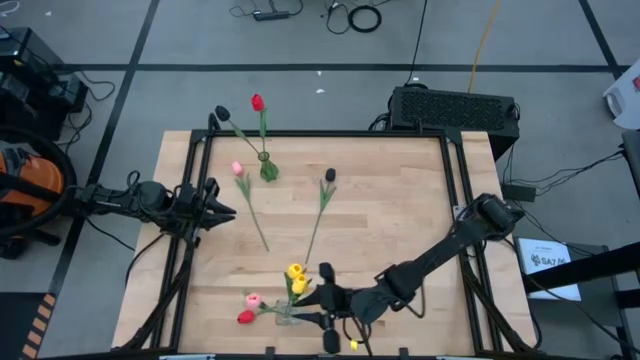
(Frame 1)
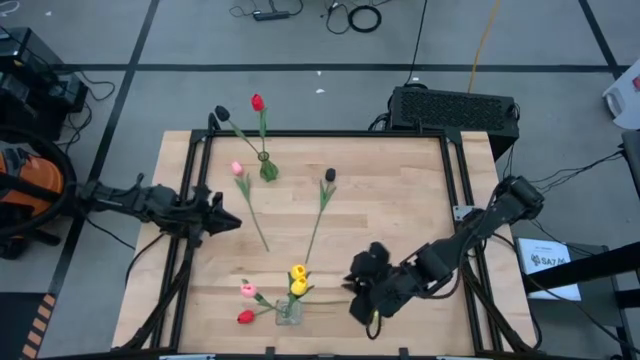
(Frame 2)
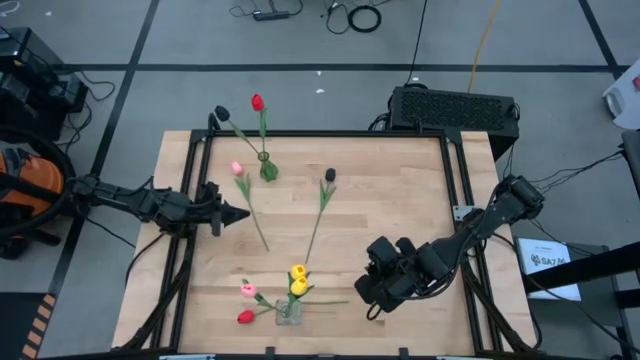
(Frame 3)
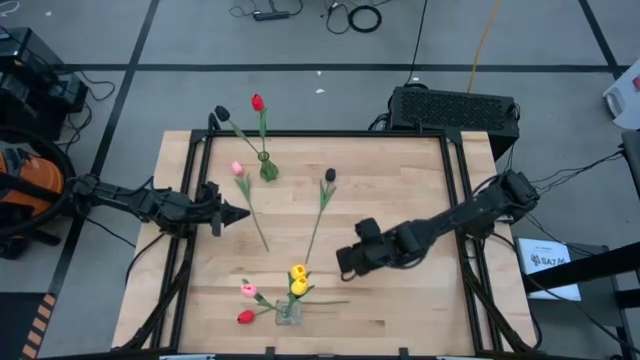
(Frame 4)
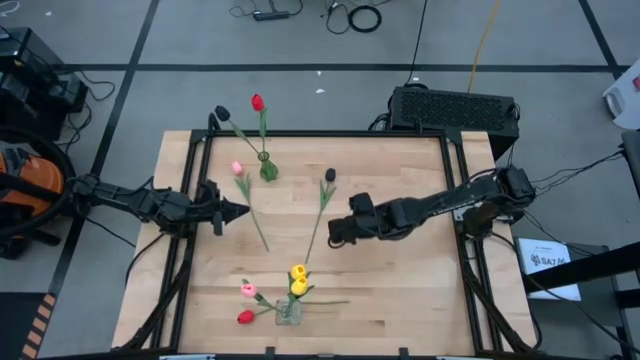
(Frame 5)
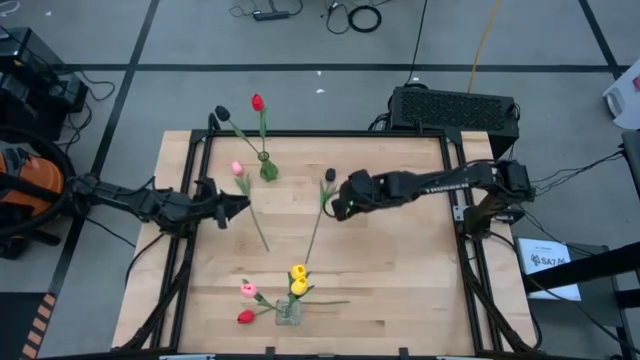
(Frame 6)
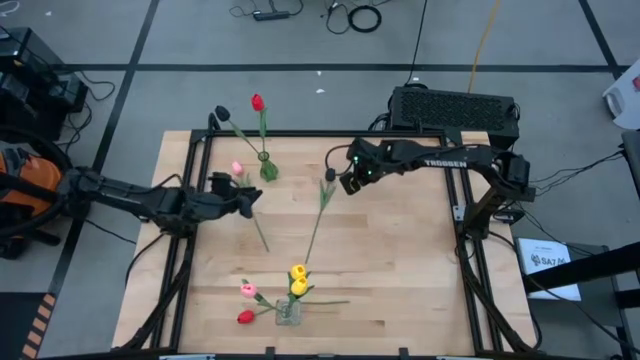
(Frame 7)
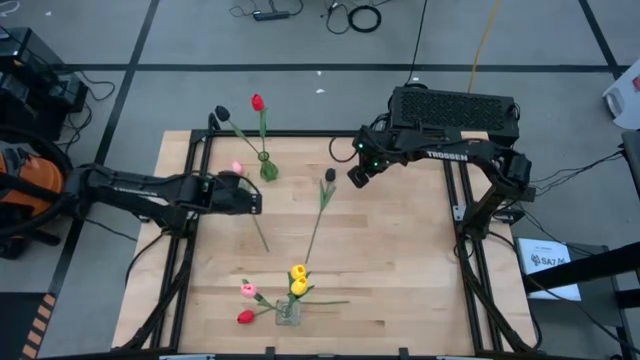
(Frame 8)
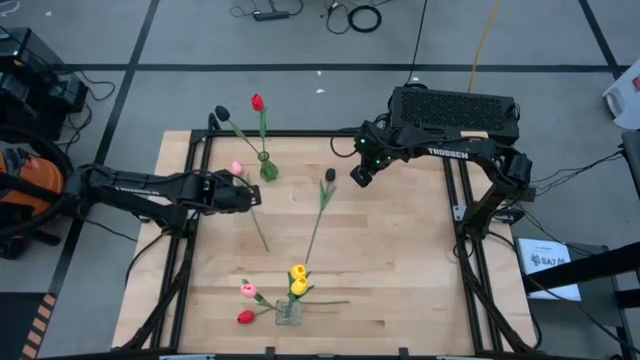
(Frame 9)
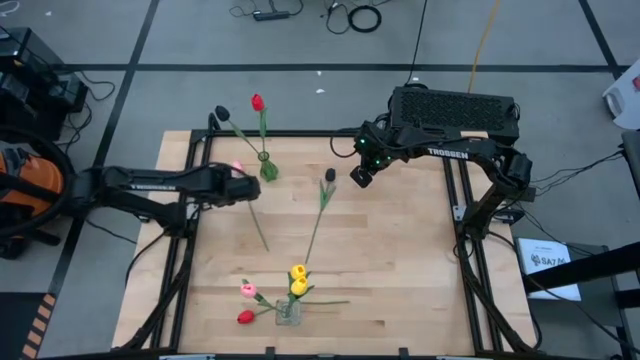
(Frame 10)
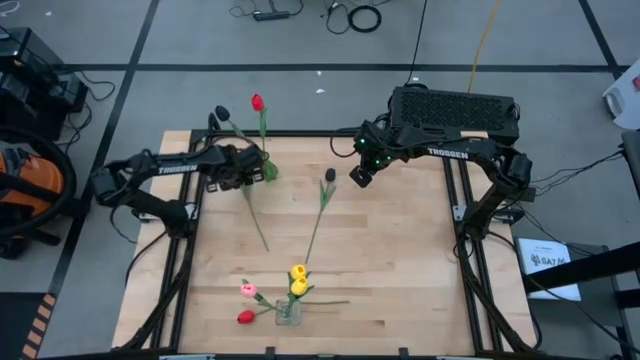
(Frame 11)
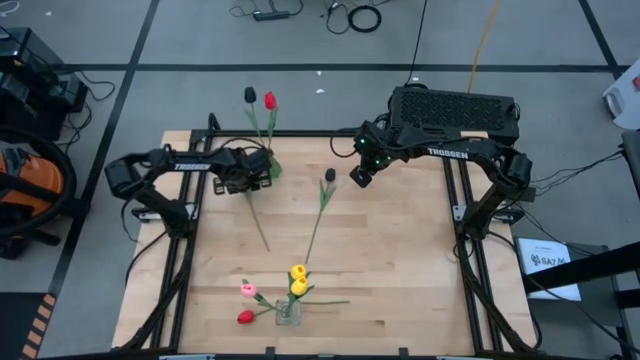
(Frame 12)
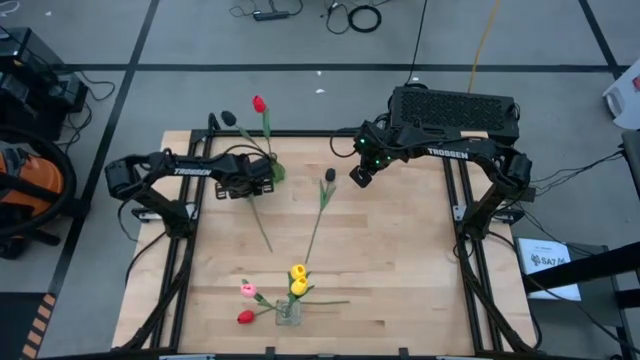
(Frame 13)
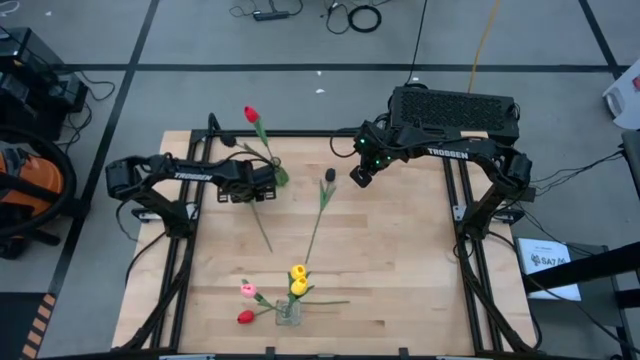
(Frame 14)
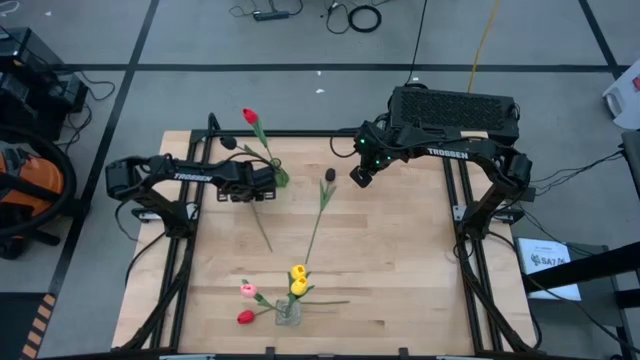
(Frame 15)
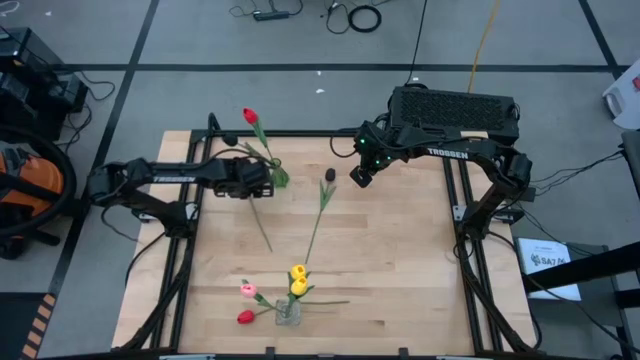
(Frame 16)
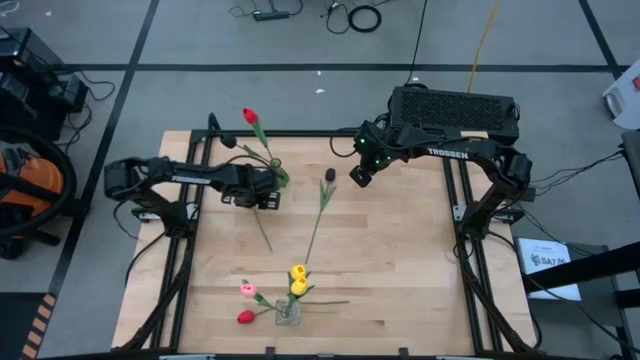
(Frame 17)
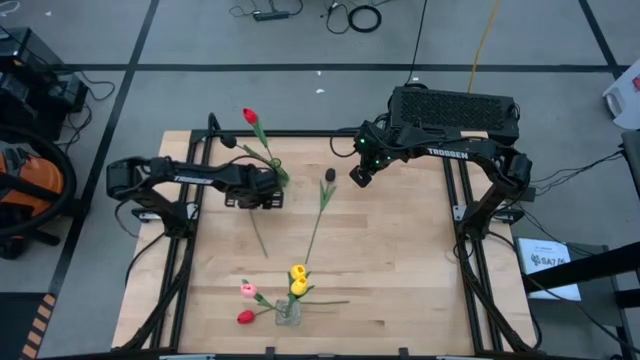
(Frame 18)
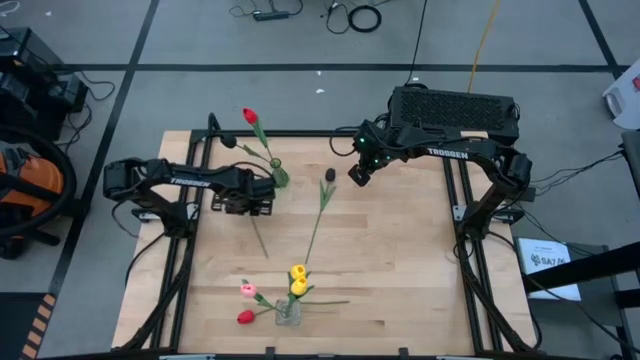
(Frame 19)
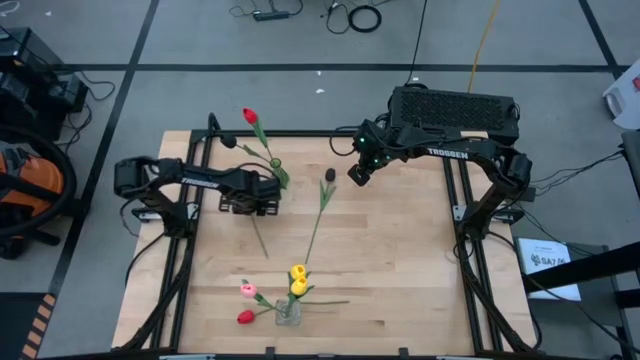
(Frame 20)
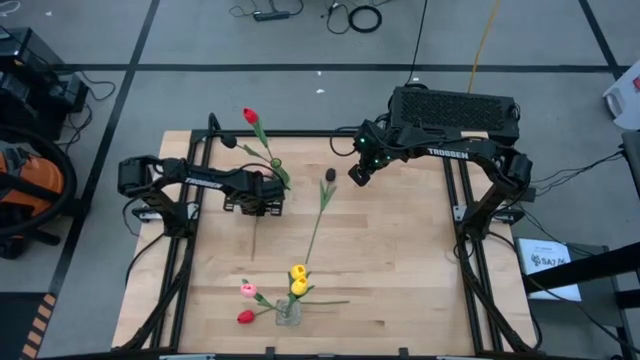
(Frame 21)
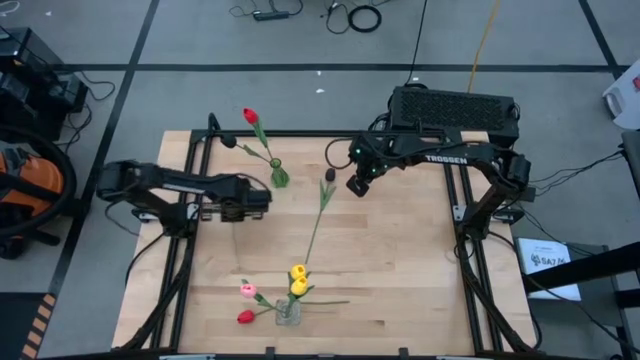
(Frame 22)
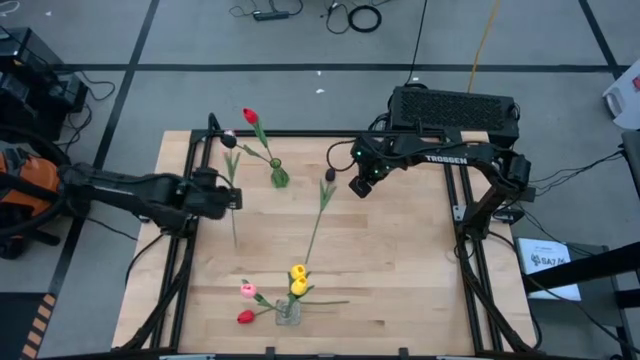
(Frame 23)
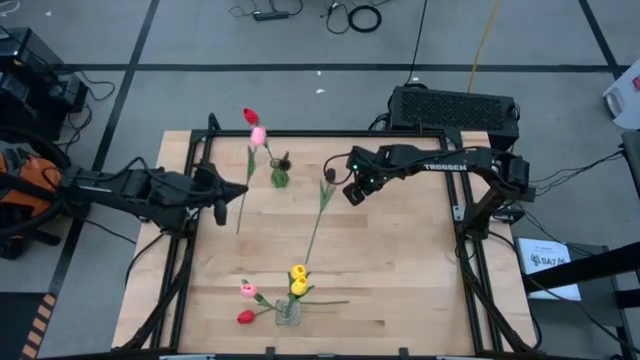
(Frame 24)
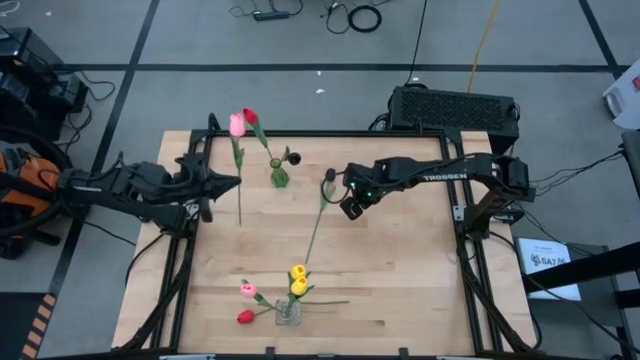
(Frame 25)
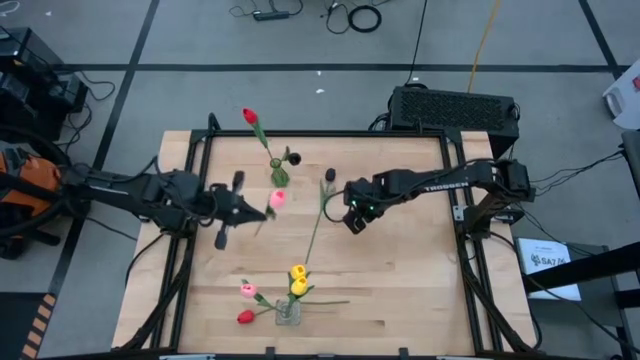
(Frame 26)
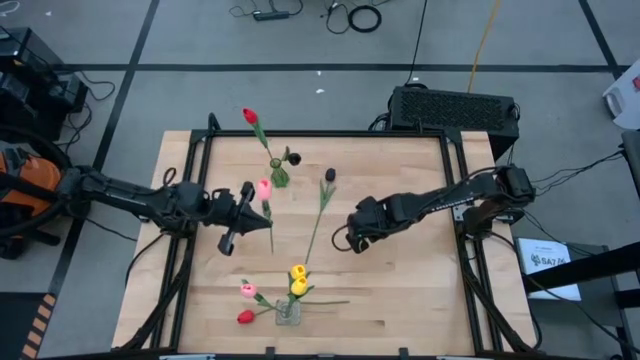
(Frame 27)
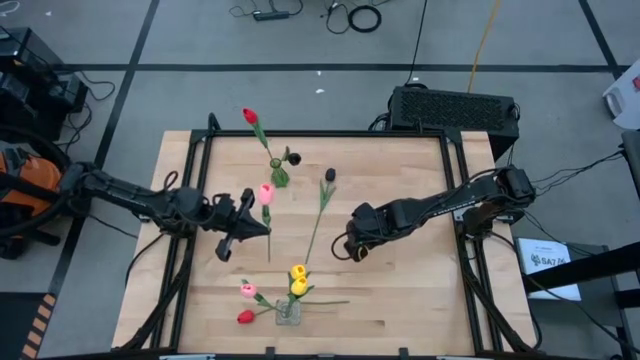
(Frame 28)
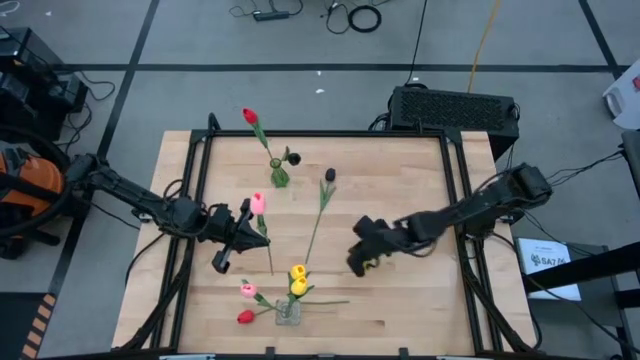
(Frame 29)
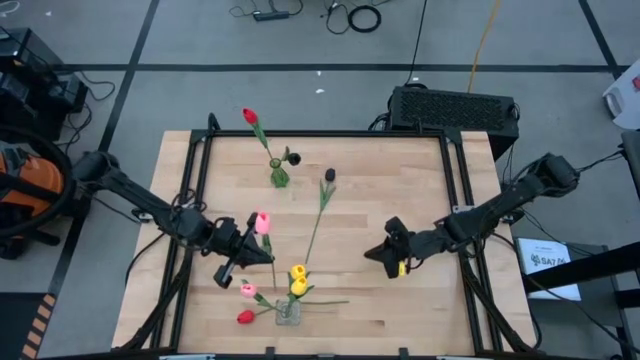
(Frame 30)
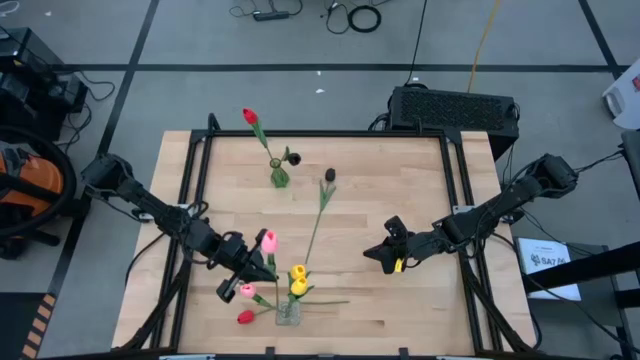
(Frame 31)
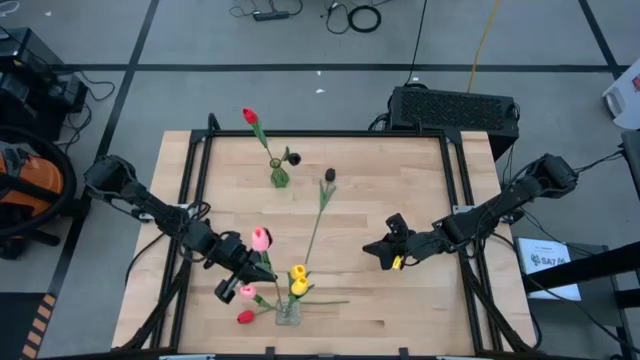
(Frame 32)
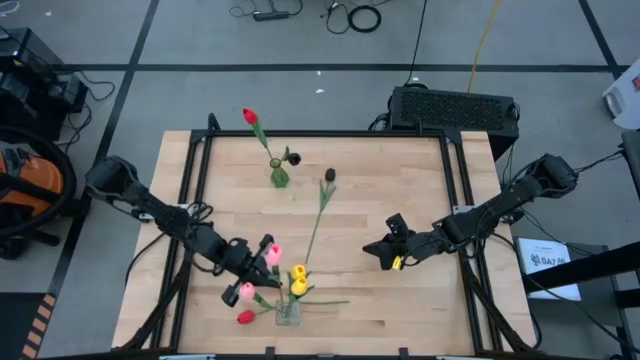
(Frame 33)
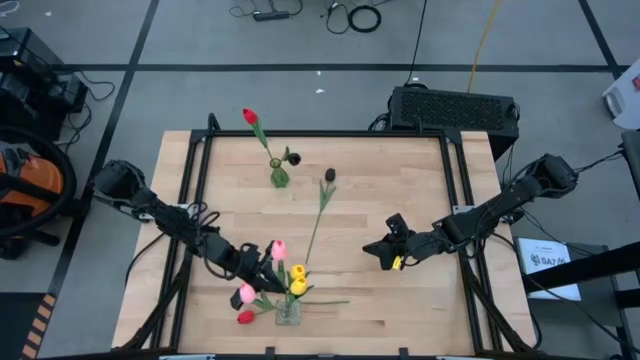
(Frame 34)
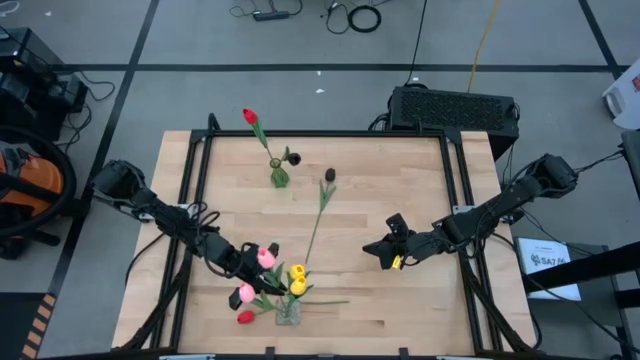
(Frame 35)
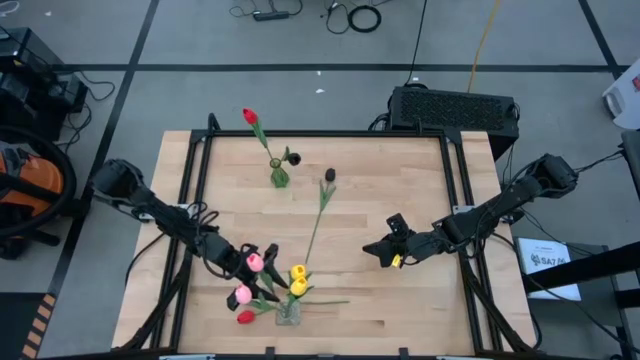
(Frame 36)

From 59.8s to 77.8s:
Task: Sort flowers into vase by color
Put the pink flower into the transparent vase
